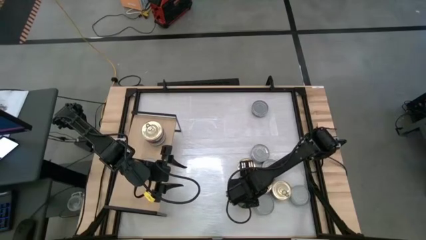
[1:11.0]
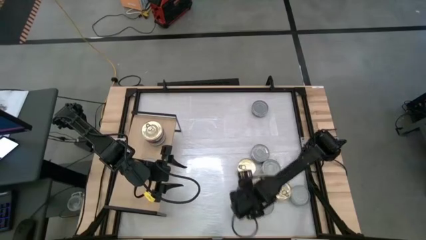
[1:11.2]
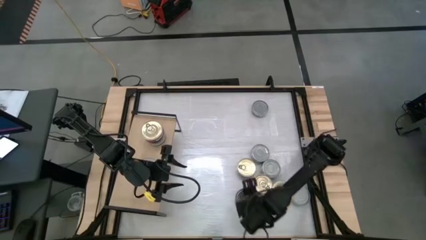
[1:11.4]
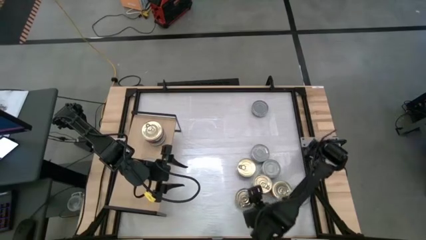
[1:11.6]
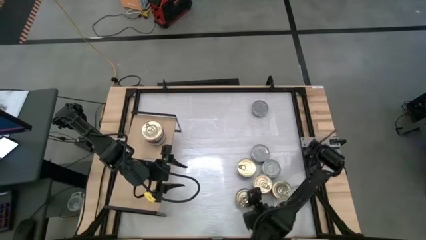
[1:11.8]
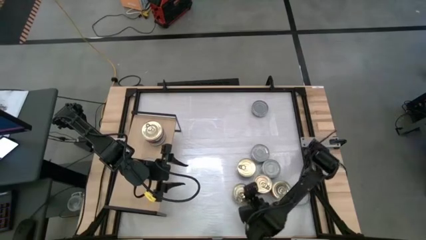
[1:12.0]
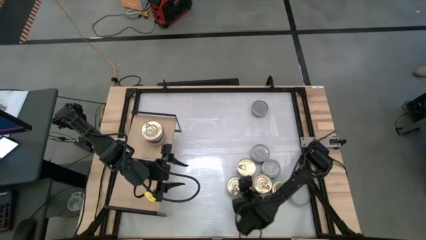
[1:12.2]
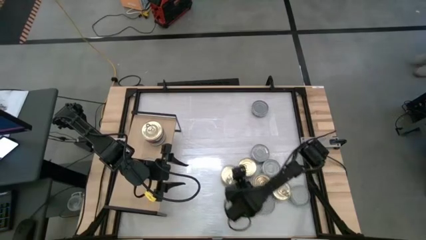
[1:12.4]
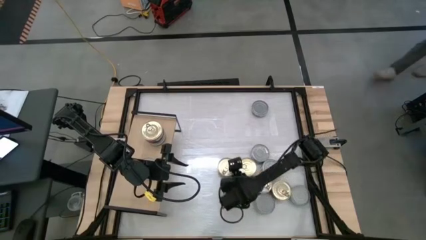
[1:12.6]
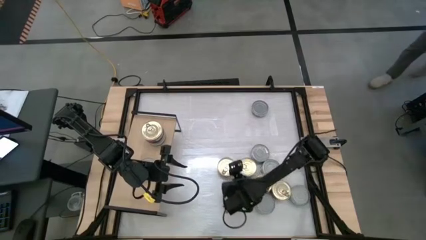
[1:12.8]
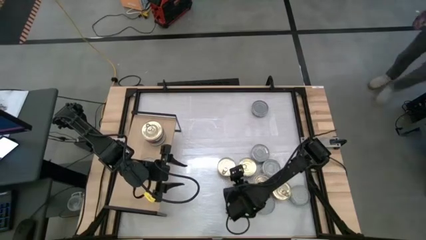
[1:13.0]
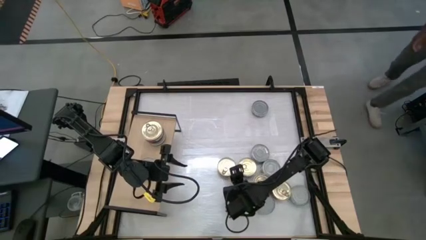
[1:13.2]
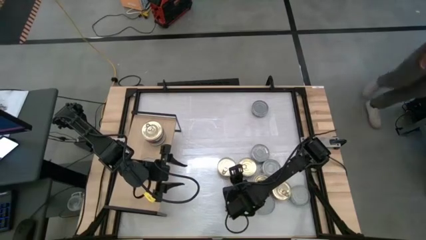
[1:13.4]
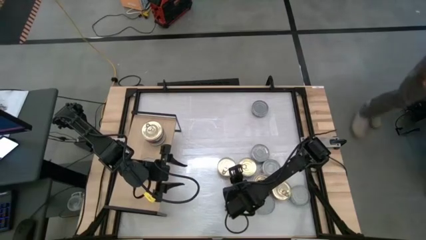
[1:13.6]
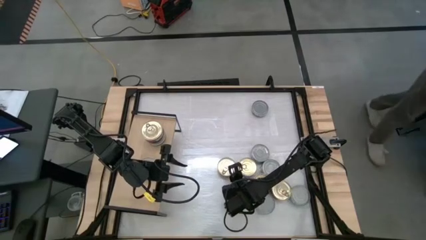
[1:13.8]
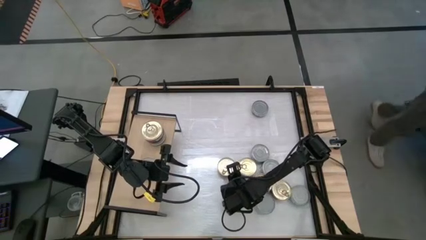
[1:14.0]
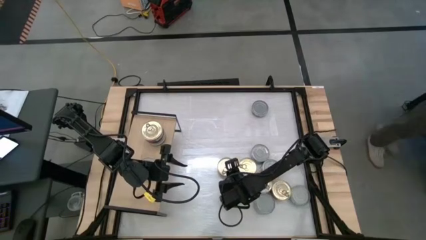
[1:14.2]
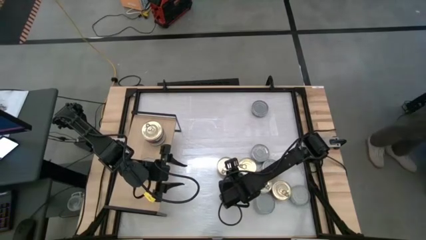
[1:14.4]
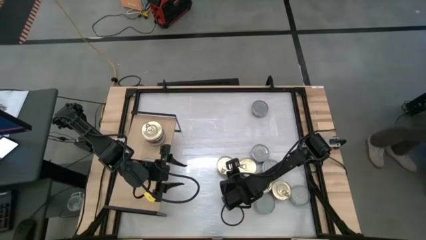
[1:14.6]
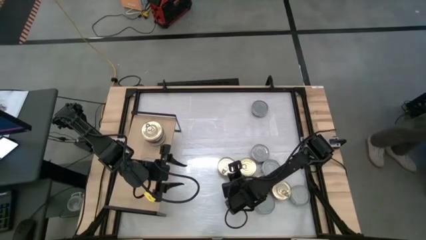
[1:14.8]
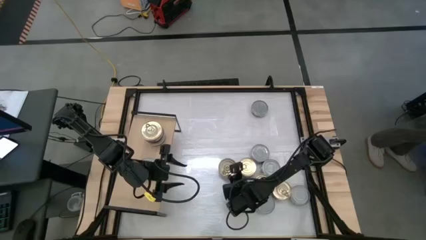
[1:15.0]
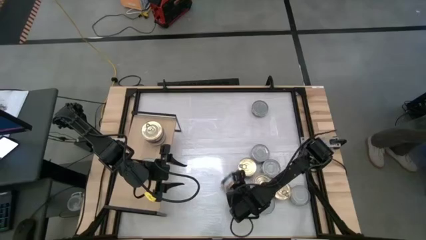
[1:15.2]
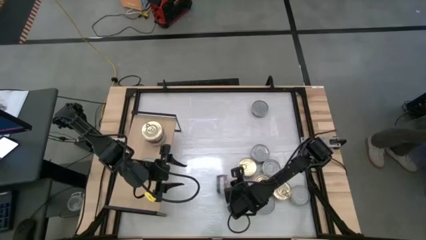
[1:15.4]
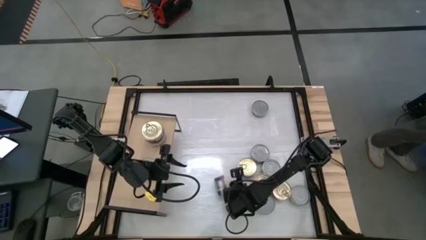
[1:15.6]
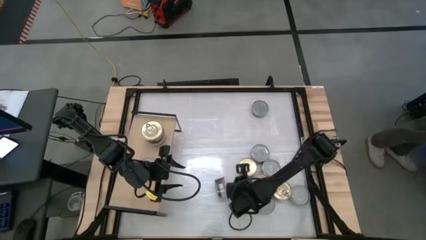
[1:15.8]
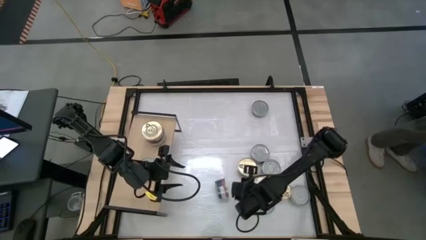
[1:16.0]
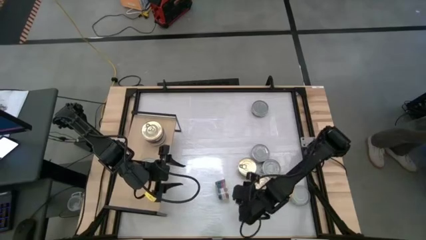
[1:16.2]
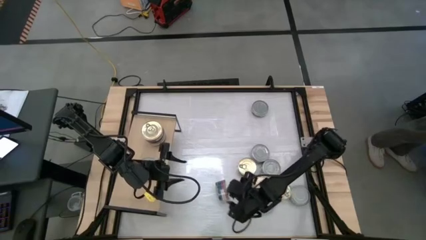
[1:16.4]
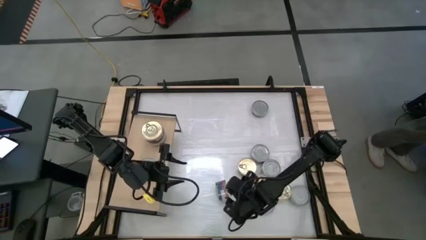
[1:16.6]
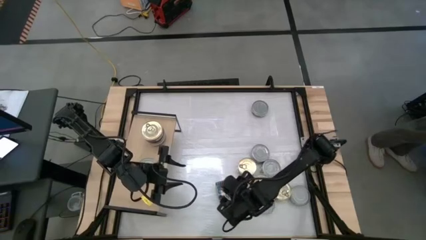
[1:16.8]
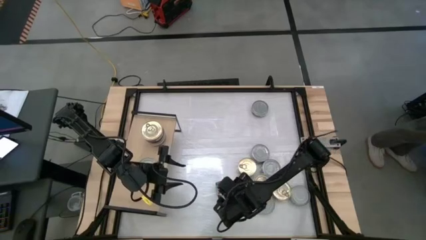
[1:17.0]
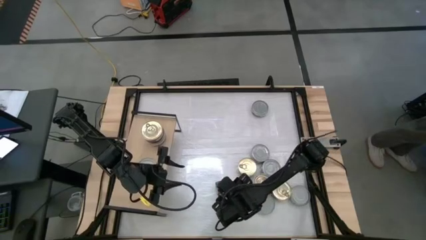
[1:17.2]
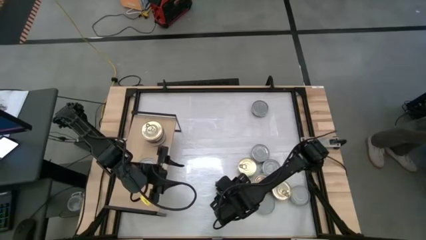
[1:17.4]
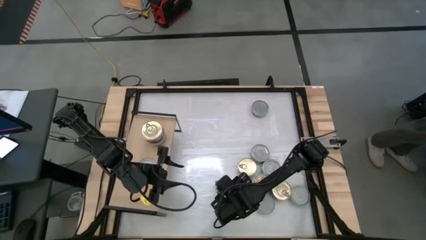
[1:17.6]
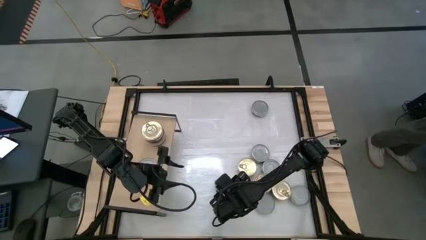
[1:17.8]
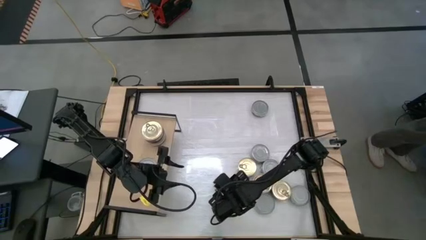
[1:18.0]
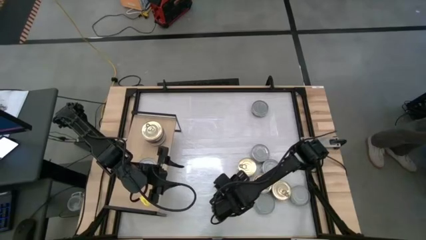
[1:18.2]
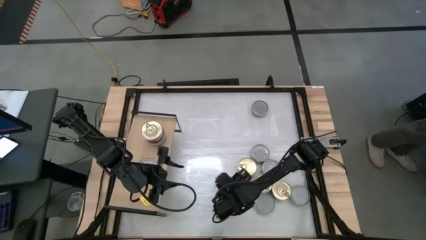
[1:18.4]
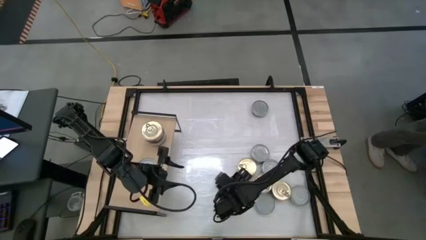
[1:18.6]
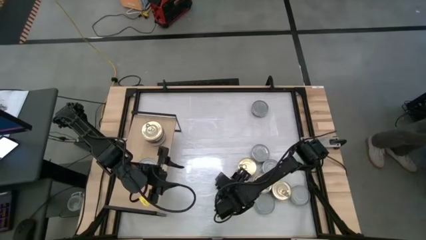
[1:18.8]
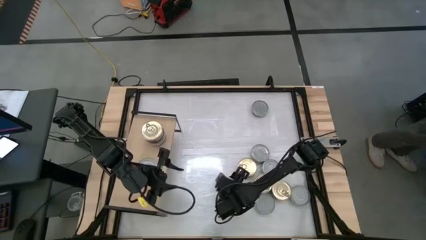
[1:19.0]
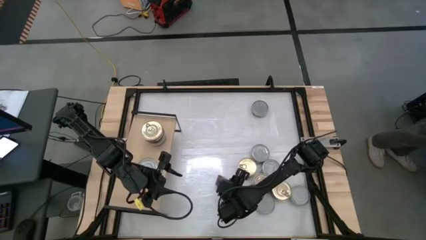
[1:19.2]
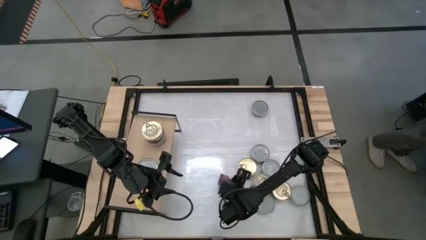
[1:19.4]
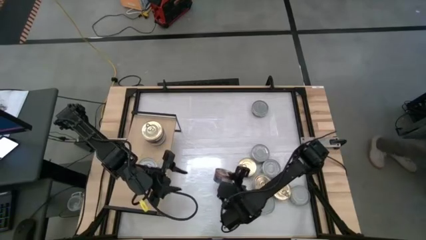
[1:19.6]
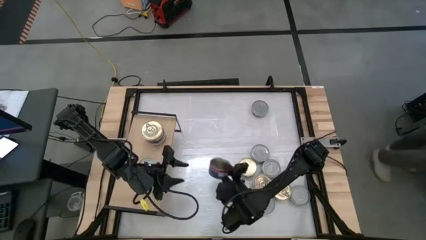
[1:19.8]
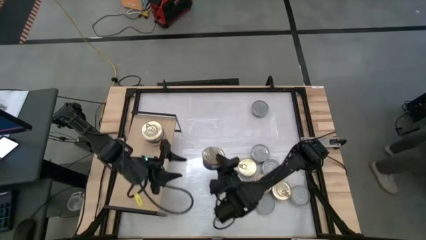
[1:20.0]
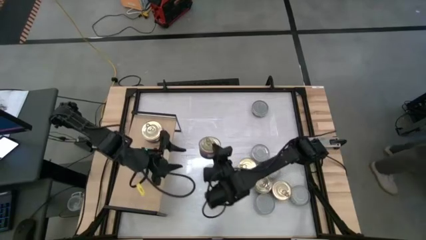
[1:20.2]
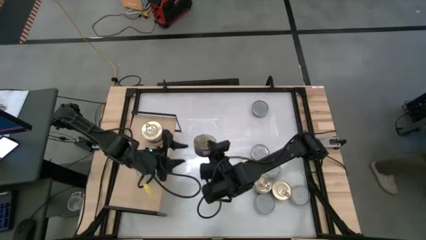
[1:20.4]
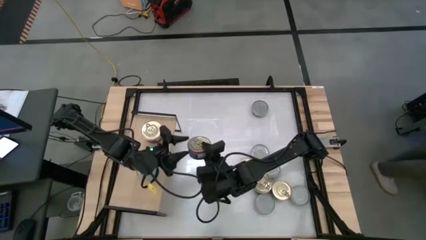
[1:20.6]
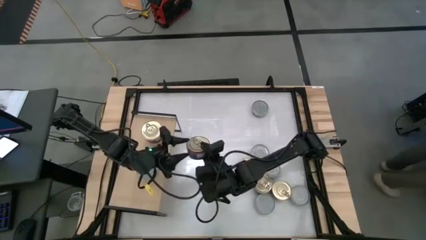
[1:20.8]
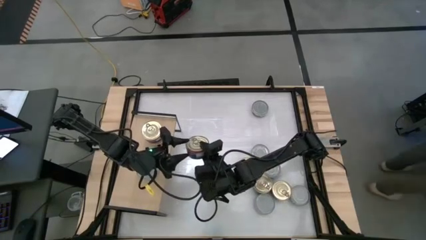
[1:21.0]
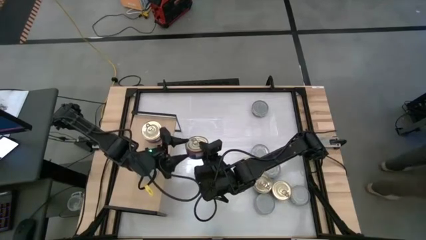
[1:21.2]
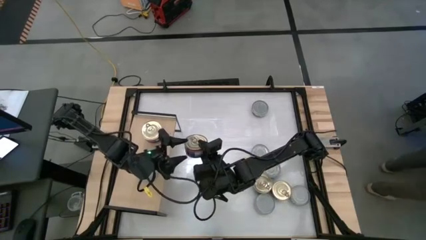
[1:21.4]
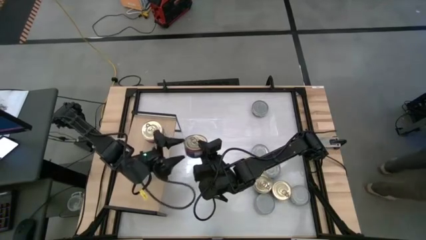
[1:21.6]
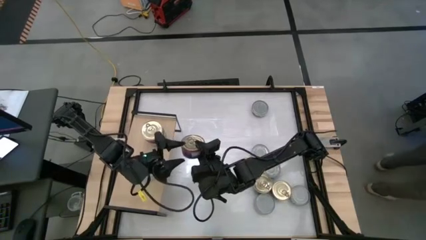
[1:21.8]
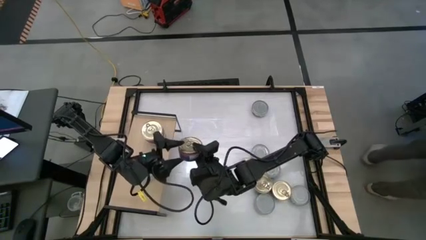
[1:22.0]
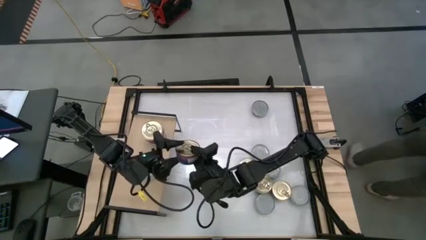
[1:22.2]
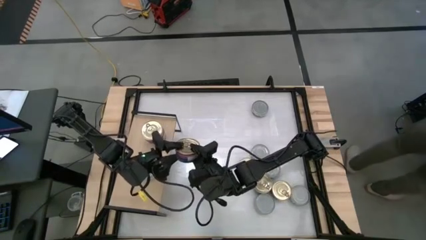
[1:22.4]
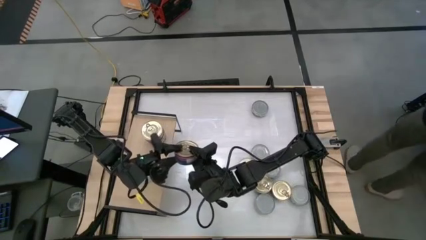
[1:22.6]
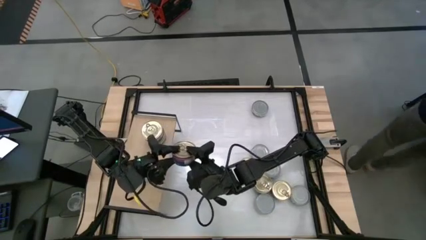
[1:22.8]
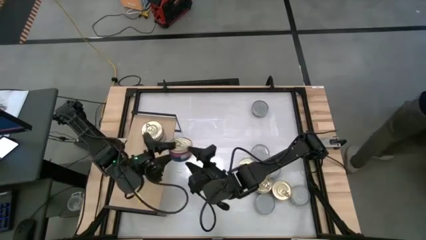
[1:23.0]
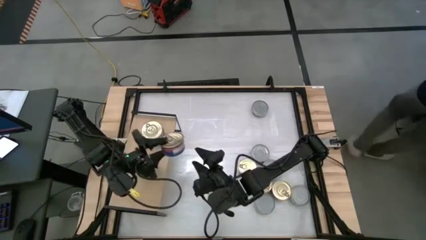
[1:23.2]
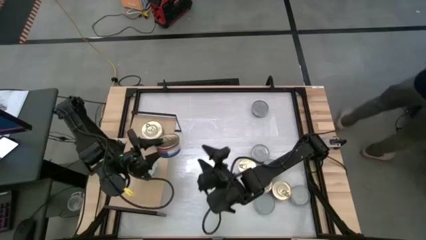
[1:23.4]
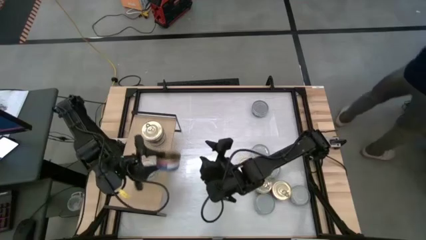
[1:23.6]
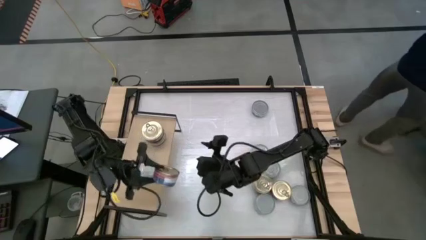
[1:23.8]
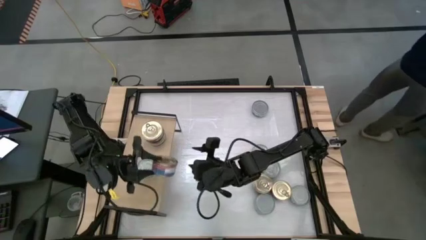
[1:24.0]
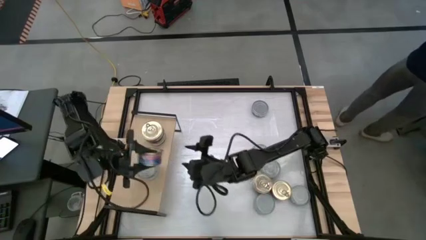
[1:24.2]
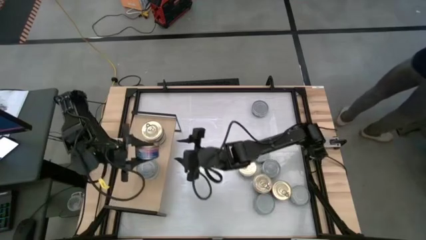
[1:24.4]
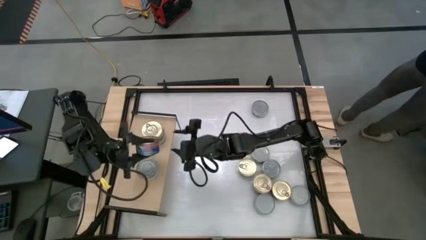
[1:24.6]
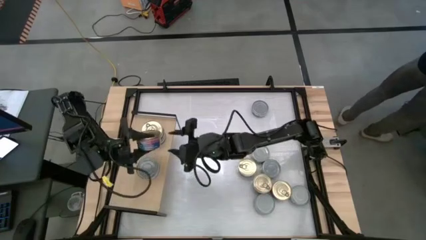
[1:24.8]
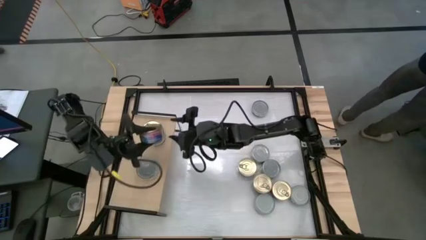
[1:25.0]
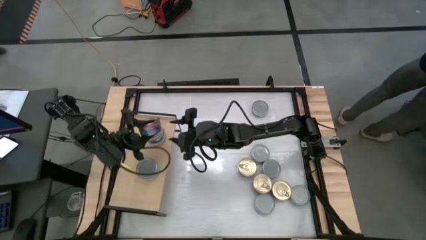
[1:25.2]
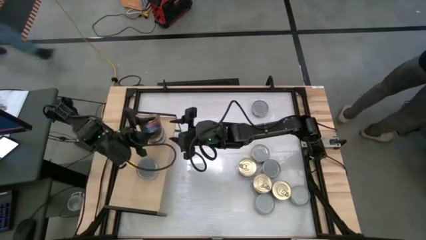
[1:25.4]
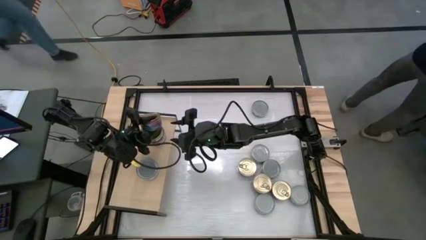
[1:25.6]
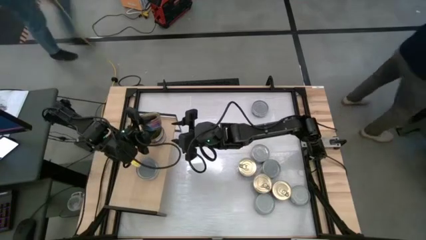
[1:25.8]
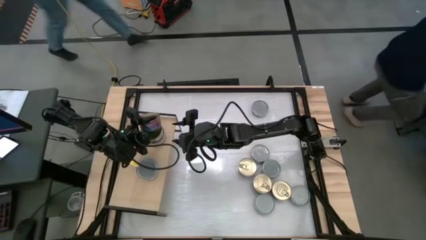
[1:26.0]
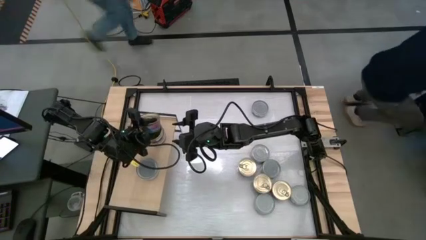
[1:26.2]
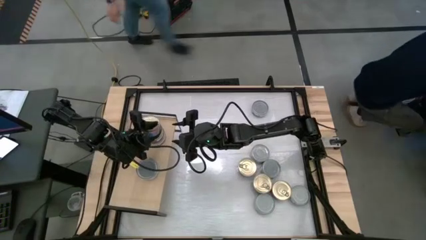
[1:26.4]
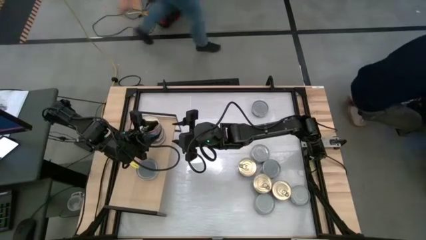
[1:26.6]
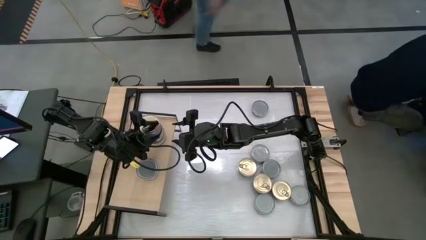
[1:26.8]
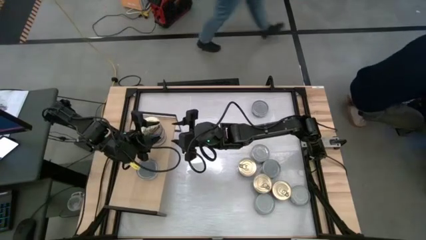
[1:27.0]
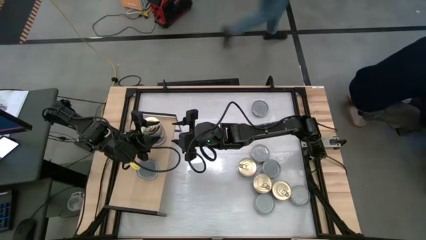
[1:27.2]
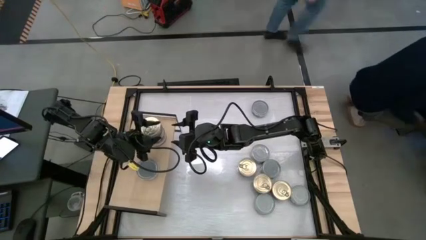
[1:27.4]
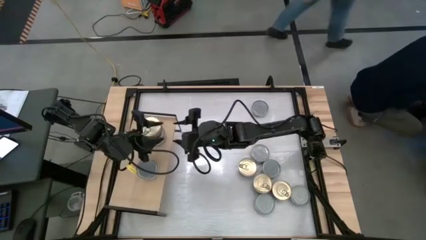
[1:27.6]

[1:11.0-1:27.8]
Task: Stack canned seafood by type on shelf
Stack the blue tuna can on top of the blue tuna can on the shelf
